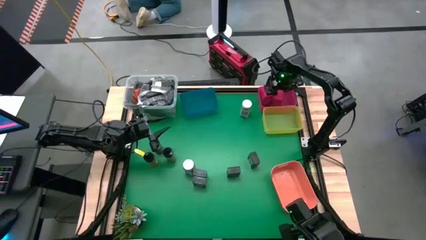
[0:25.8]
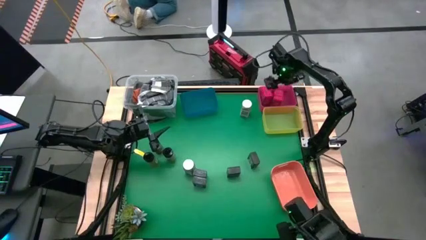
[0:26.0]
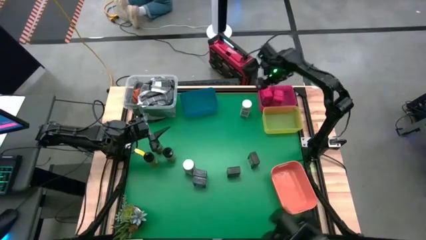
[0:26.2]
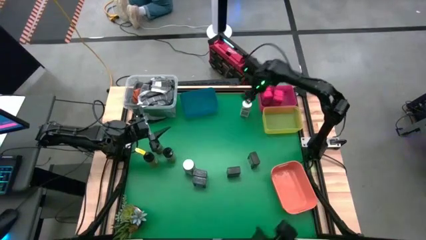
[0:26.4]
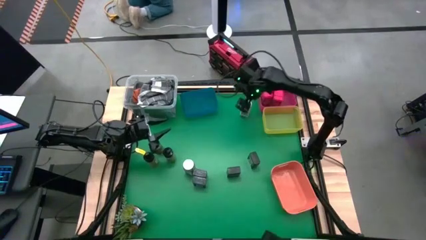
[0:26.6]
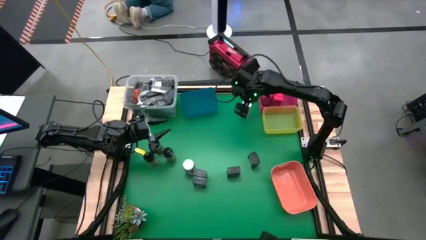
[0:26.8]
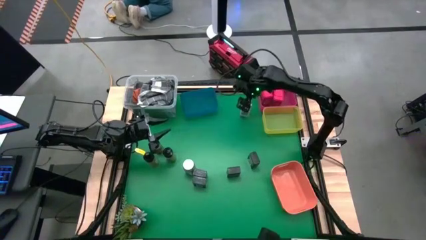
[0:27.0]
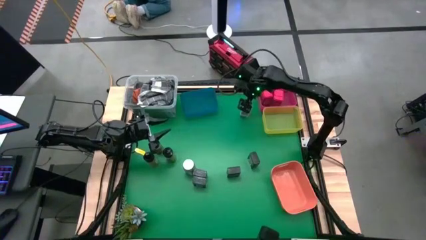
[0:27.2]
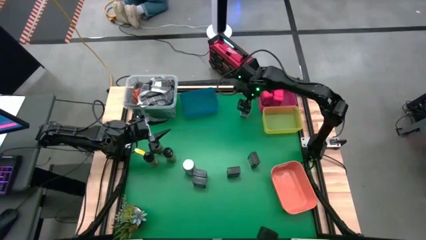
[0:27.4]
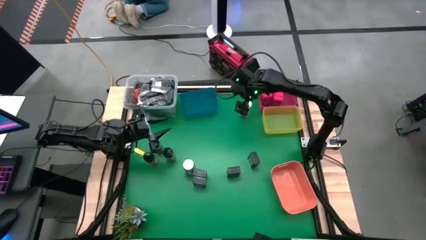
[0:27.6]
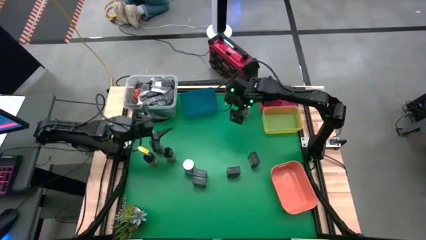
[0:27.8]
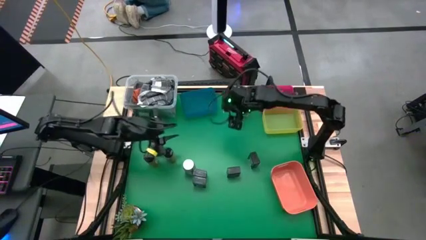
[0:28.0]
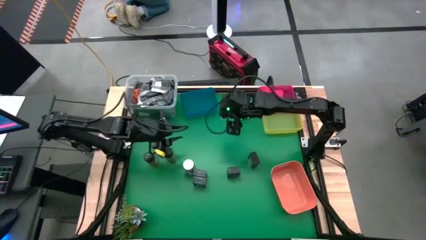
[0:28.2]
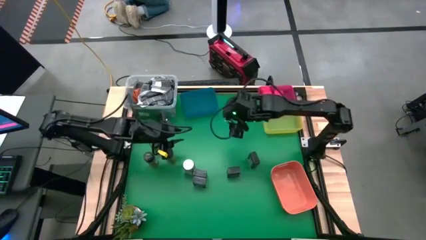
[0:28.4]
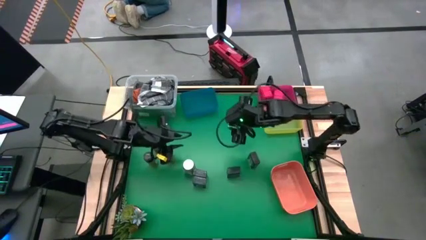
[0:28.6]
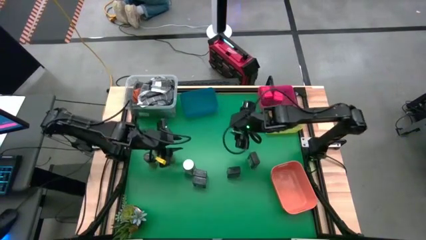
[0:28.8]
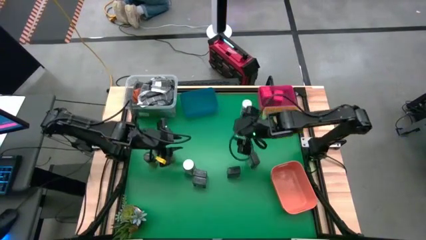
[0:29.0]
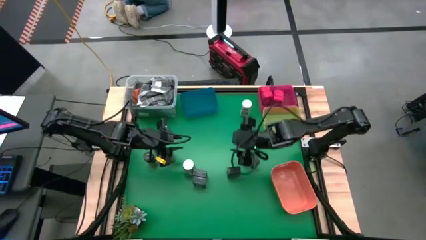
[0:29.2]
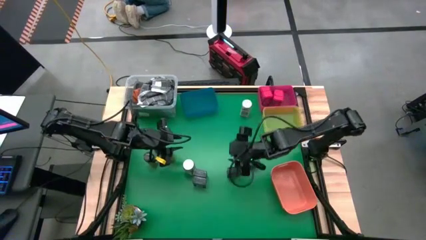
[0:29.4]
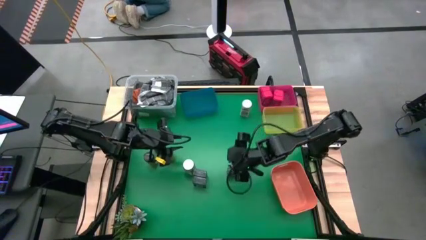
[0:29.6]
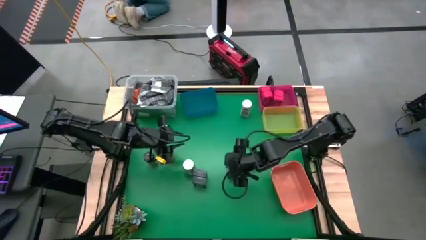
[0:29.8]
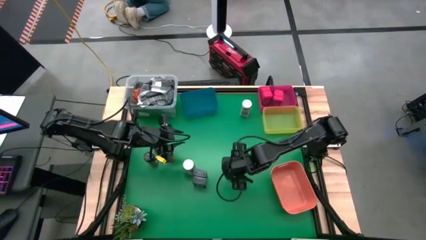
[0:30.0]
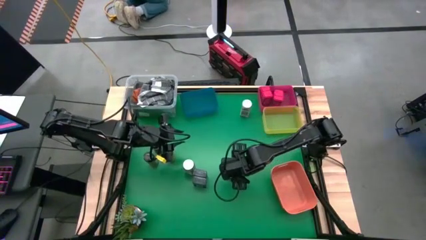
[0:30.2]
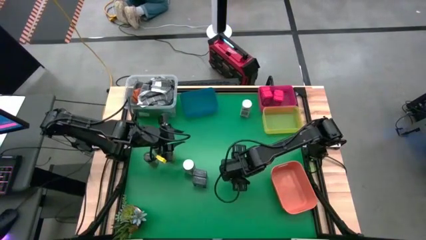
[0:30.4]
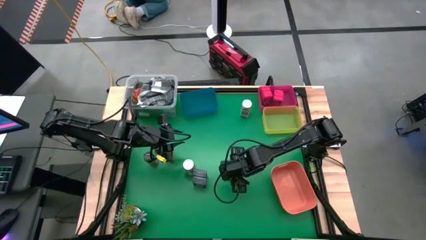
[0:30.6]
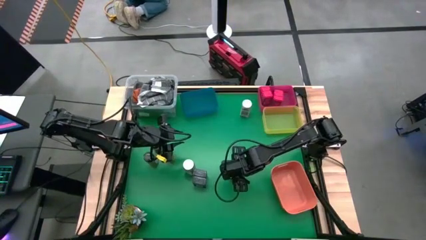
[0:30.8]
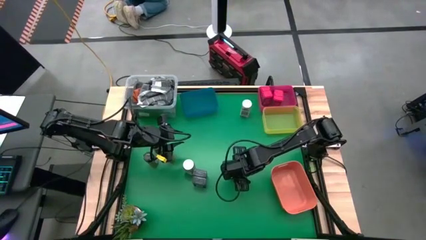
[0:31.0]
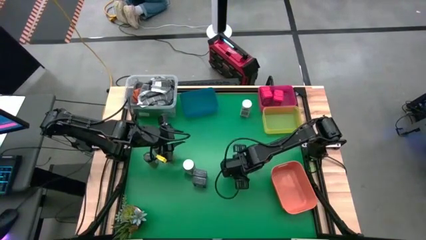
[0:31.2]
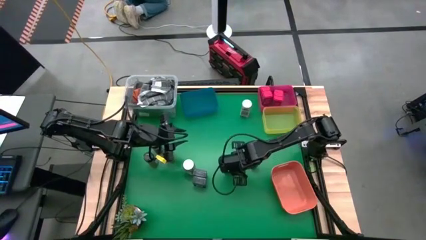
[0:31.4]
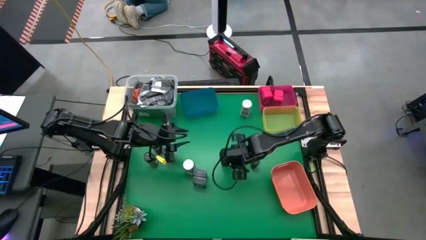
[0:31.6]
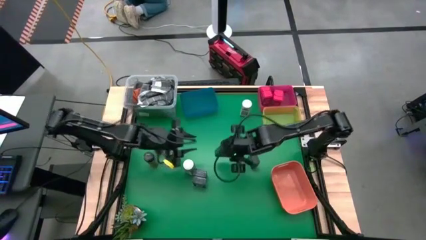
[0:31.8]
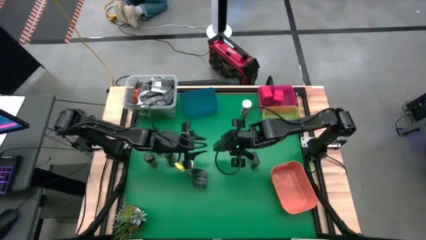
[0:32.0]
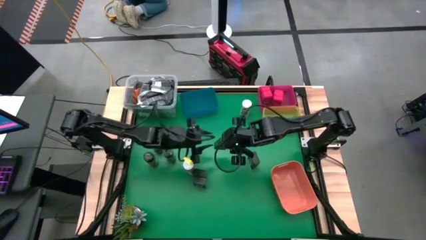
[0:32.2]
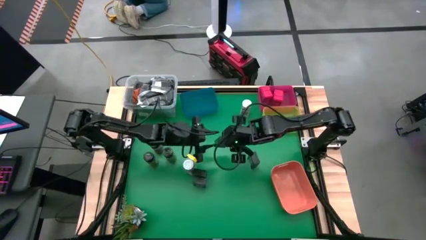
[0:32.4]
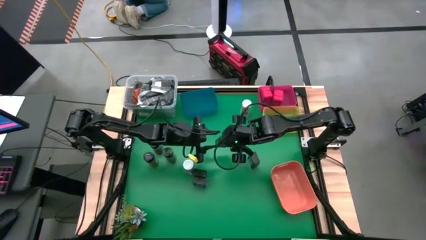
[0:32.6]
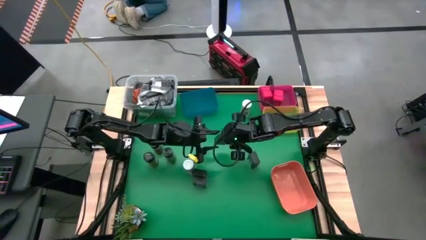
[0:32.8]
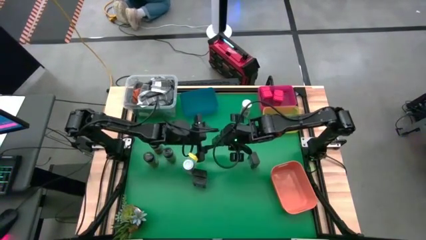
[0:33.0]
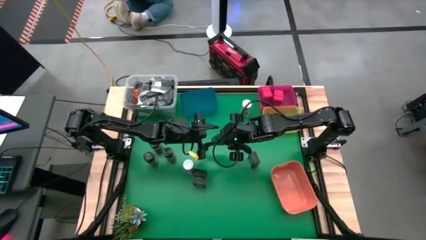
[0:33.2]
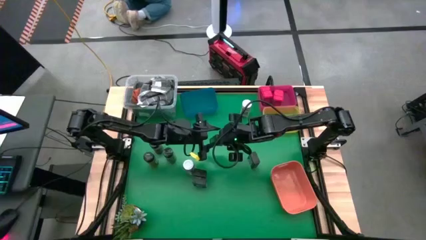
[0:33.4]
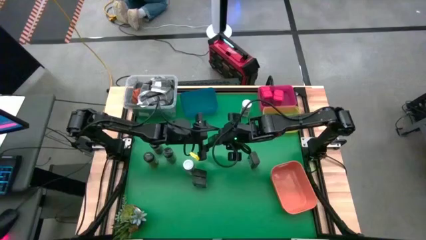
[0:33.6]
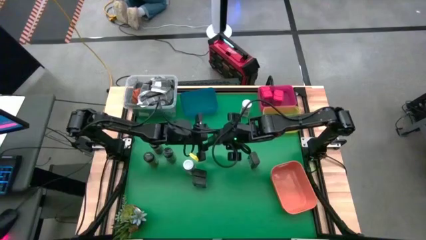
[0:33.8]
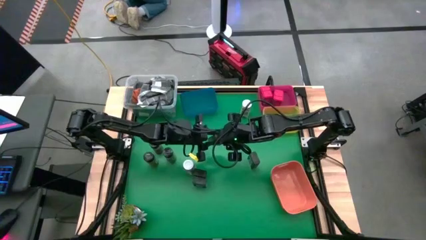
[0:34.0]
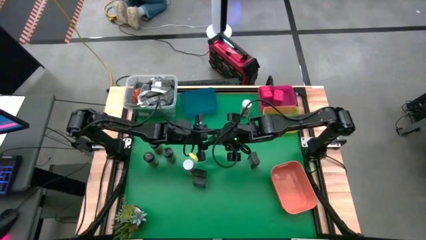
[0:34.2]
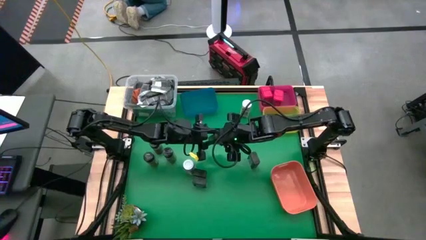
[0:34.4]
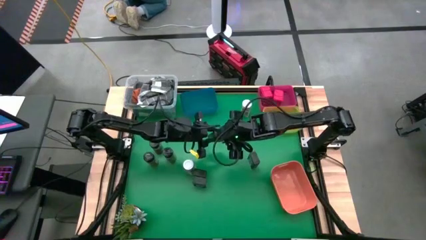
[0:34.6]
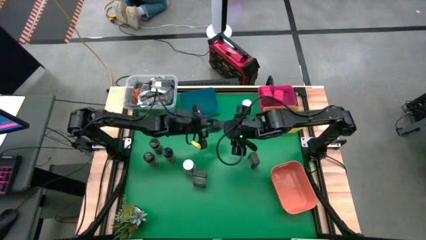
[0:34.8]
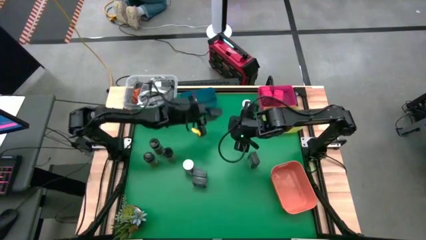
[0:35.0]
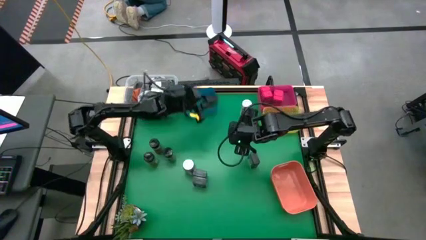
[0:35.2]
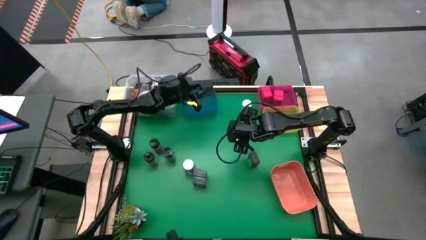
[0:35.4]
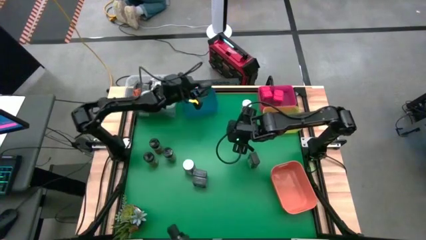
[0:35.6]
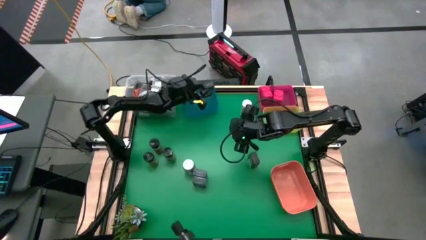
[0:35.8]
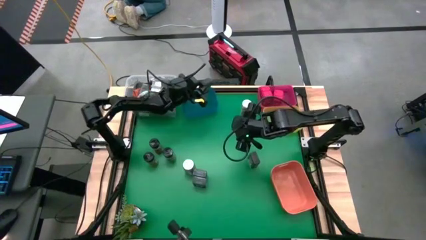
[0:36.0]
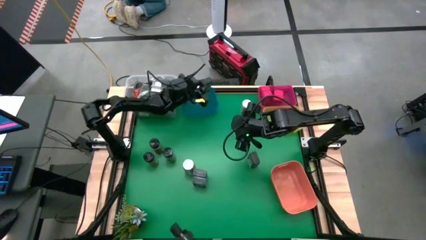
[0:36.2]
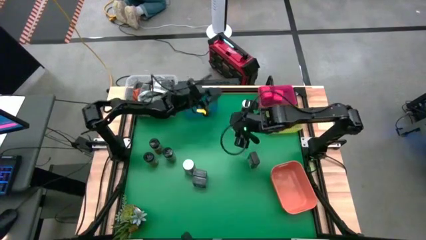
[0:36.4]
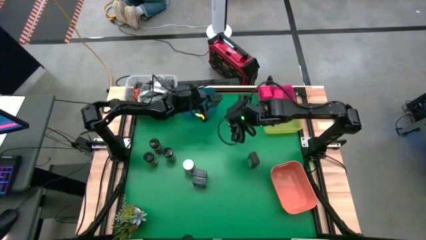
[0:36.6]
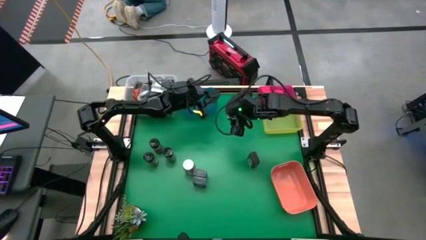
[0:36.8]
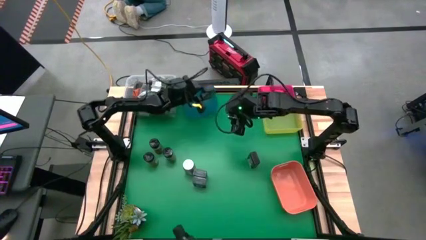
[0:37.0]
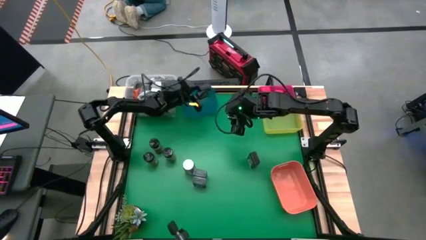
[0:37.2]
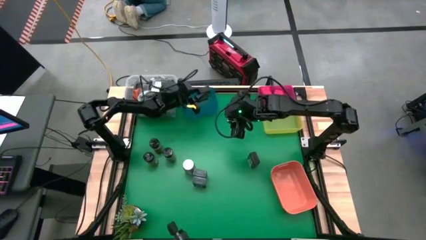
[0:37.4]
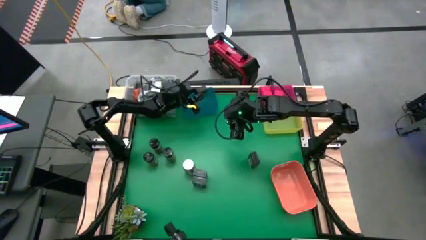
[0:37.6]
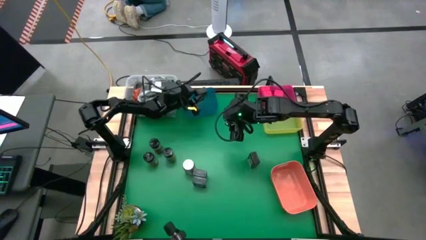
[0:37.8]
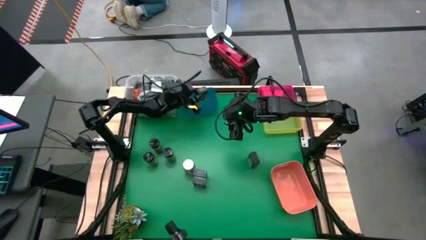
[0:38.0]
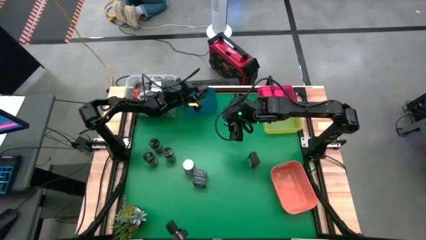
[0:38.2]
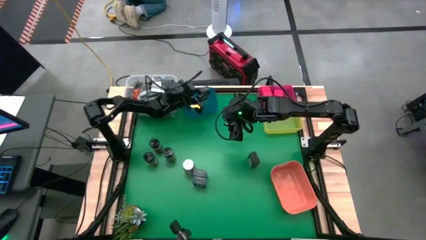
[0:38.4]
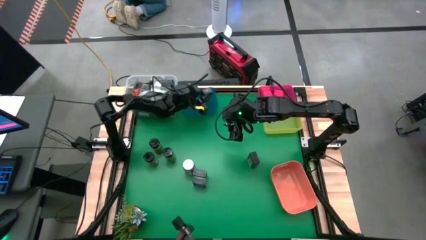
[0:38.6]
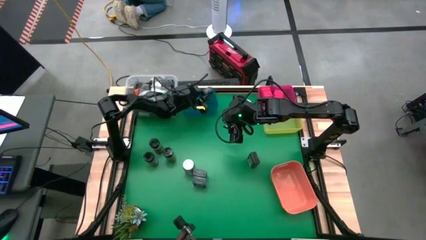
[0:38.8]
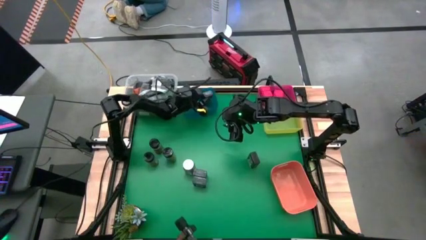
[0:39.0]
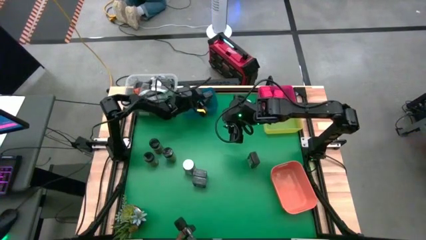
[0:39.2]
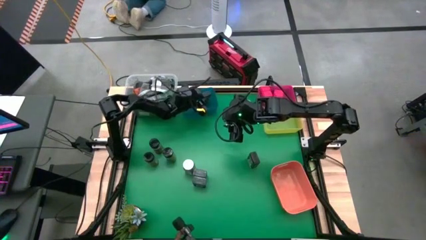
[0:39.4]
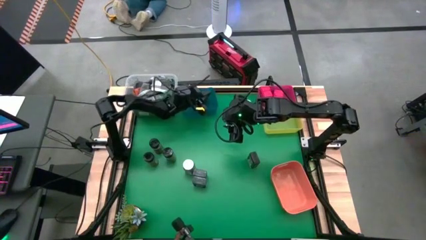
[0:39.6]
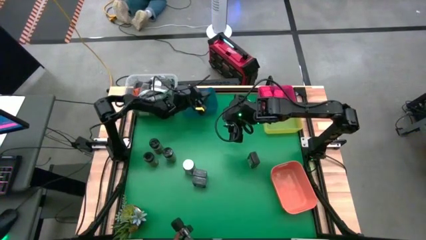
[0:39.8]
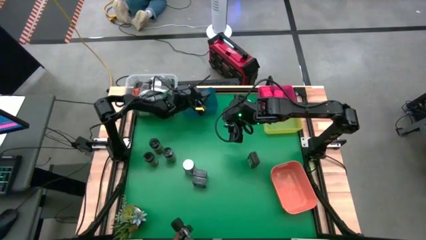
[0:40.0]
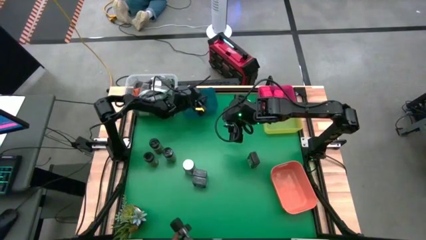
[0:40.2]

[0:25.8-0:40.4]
Task: Sort spices by type
Put the black seasoning from the middle into the blue bin
